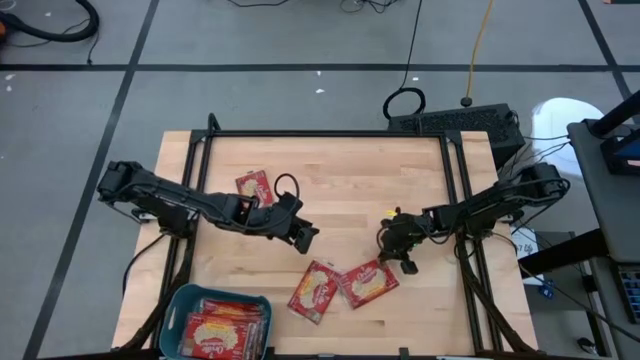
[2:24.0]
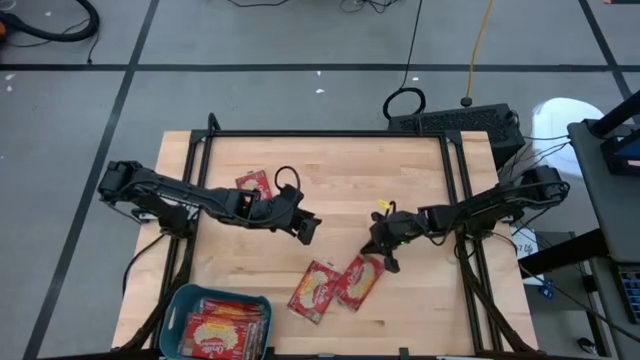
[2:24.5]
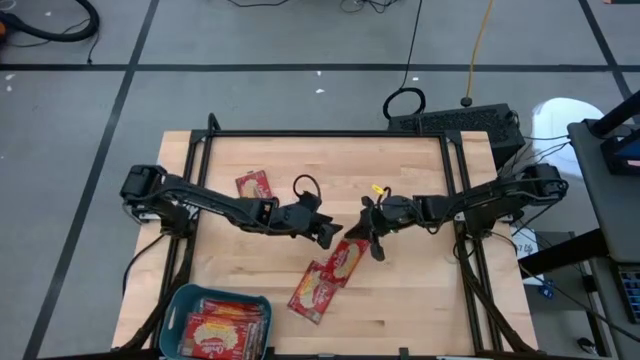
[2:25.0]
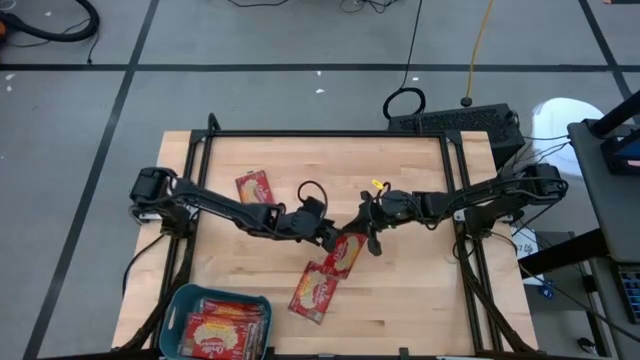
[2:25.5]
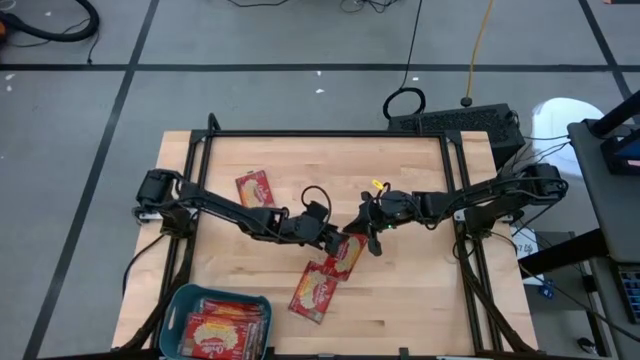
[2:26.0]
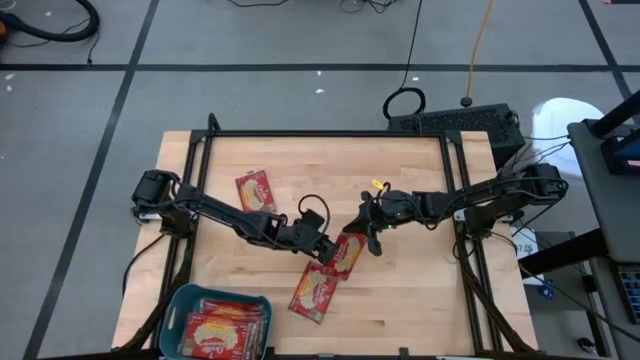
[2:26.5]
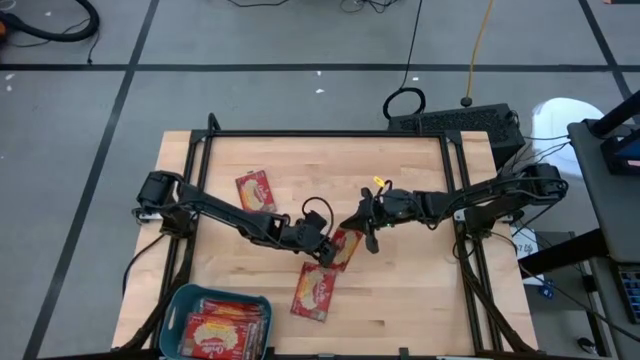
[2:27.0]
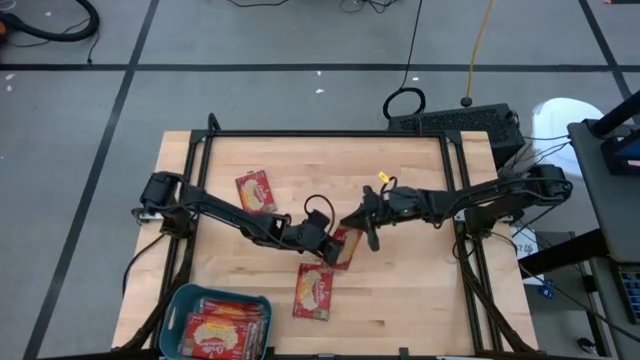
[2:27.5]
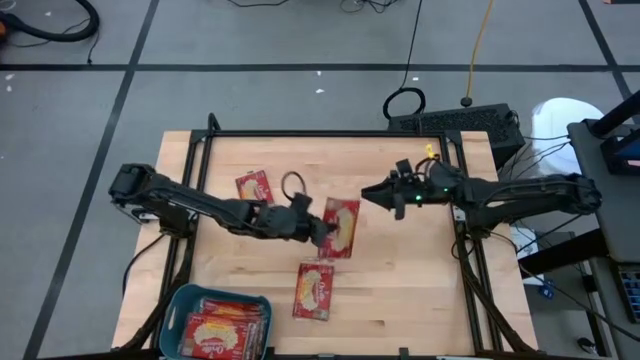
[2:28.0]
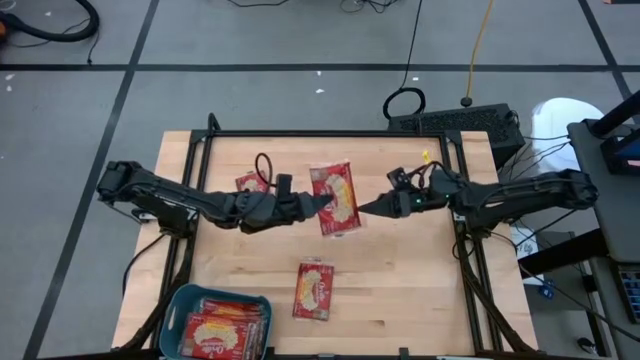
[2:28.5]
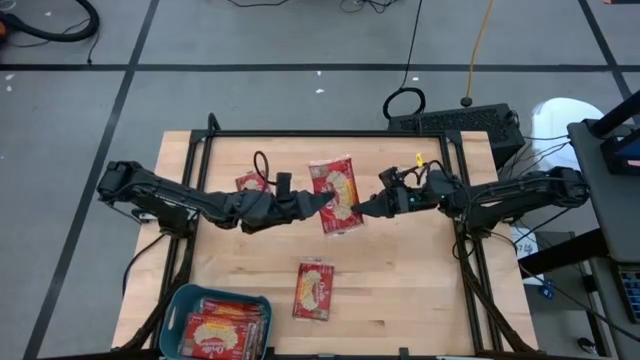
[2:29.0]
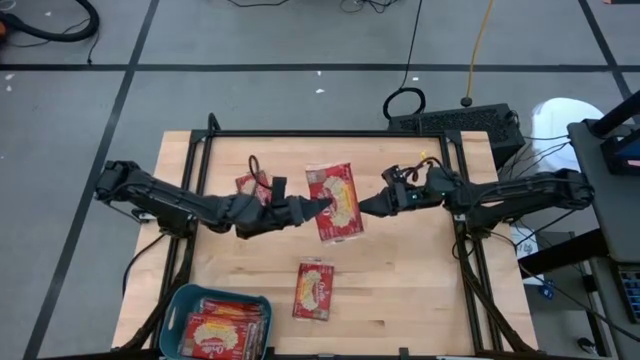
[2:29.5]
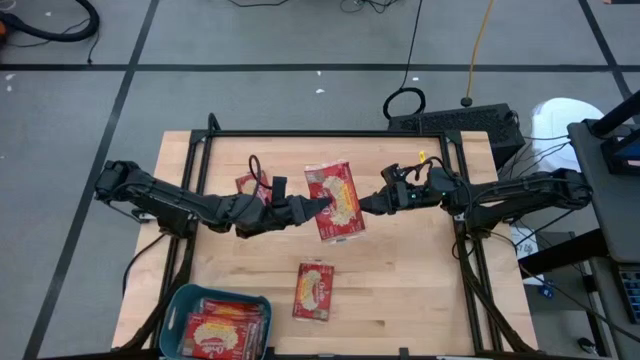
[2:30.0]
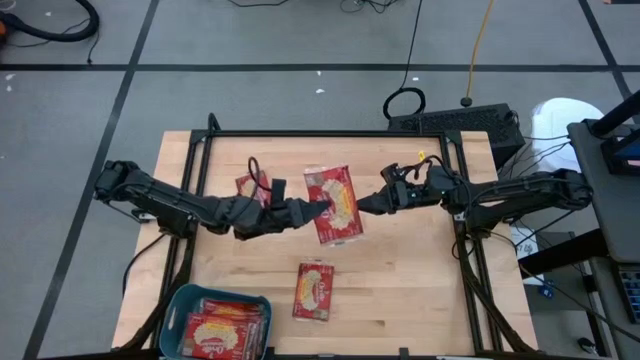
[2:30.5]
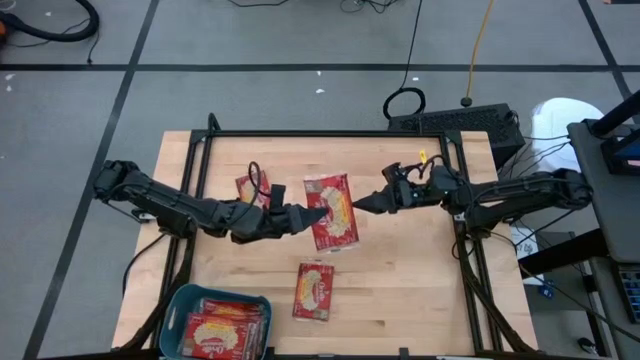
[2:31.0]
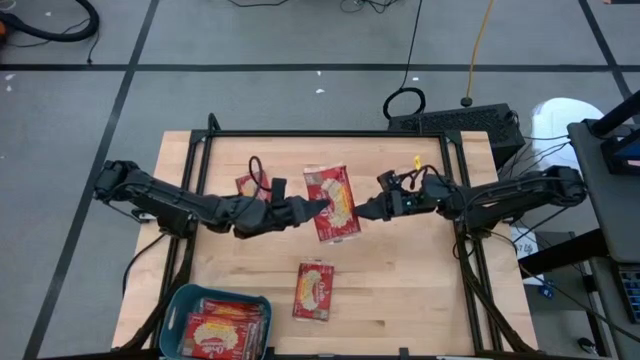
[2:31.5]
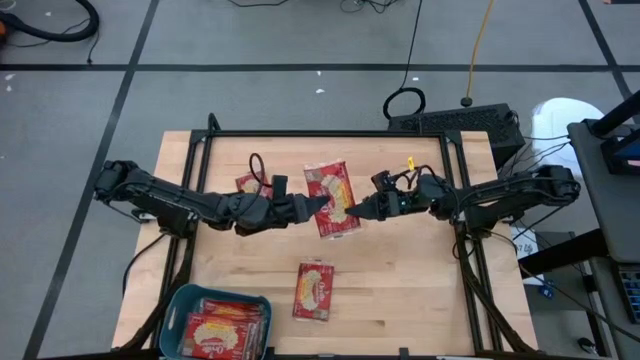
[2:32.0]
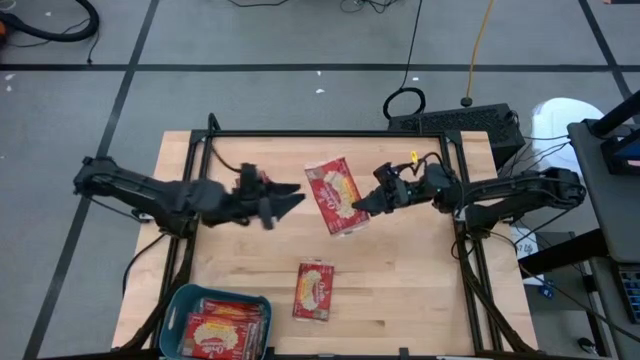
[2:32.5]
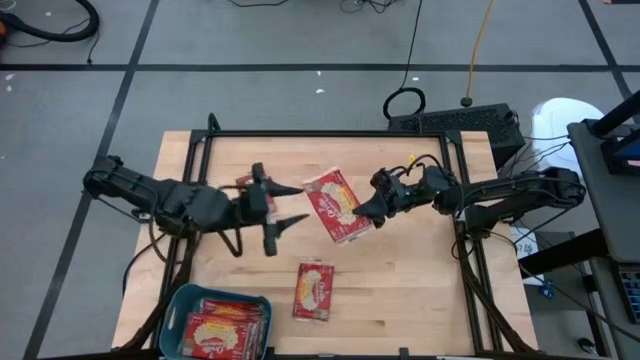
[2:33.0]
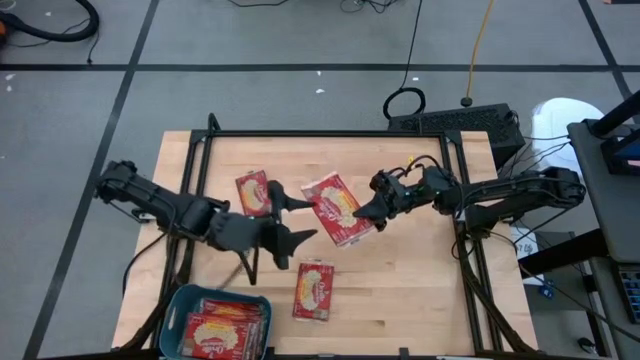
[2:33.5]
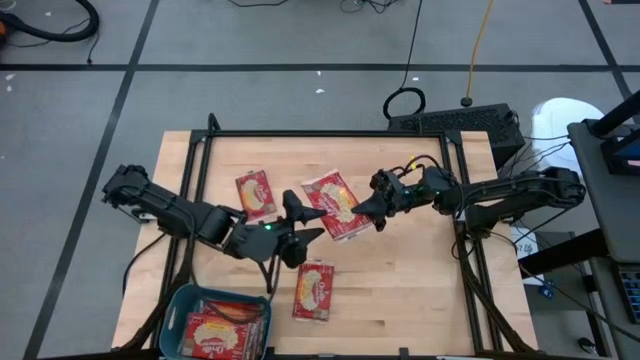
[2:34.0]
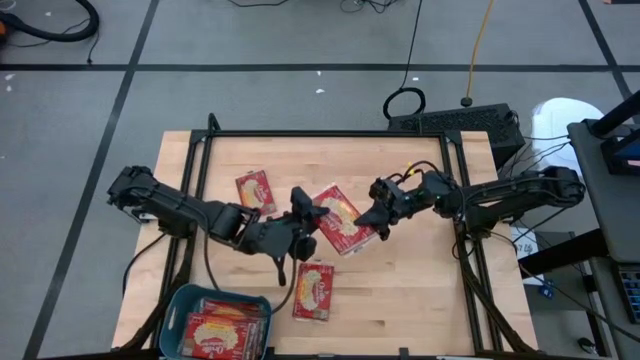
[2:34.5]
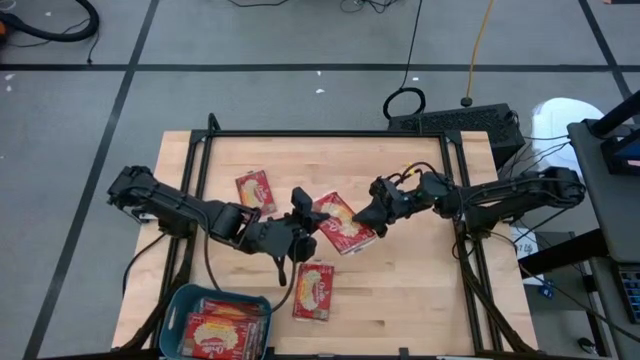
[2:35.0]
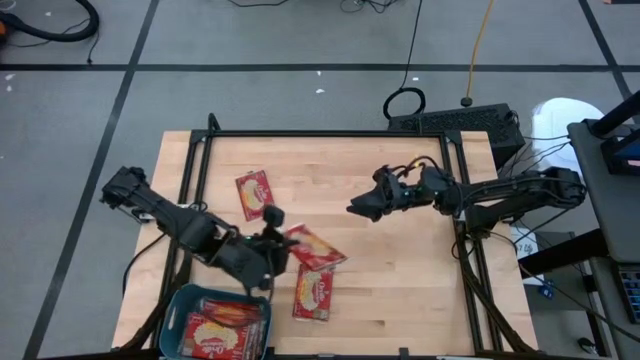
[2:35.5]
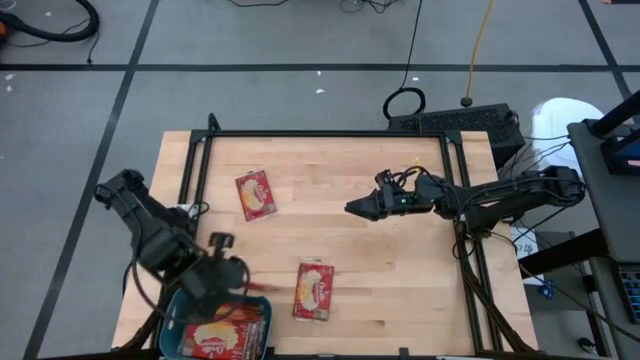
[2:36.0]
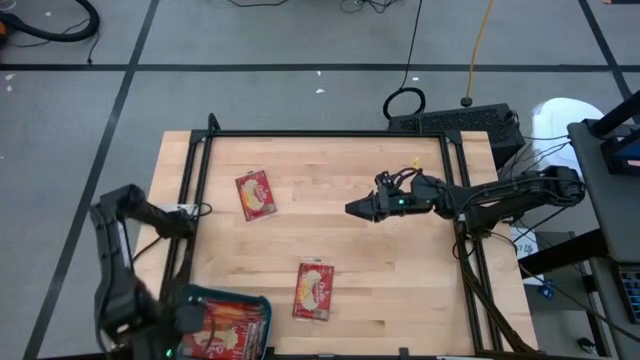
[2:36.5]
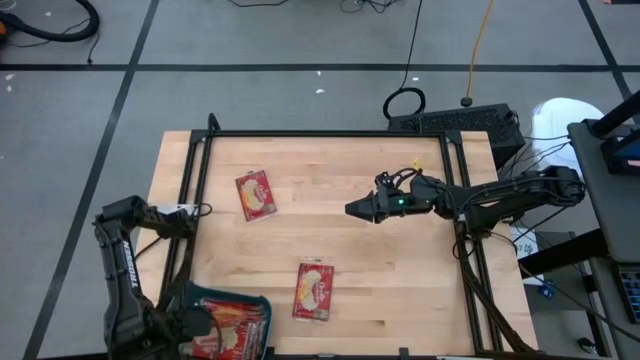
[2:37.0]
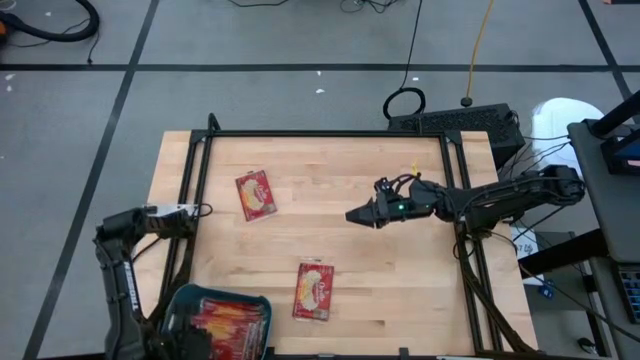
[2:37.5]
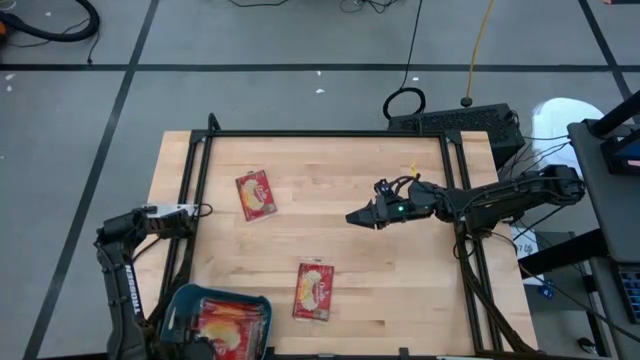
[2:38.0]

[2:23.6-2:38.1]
Task: Sort popcorn bags into baskets
Put the popcorn sachet into the bin
